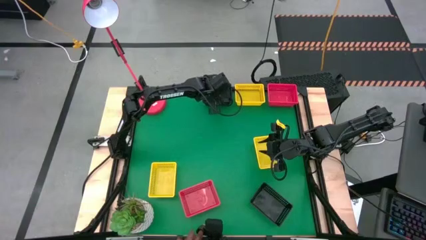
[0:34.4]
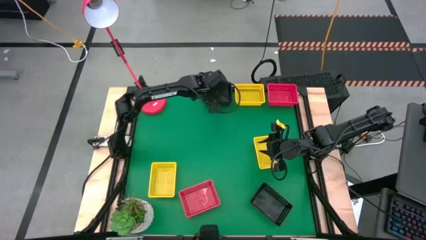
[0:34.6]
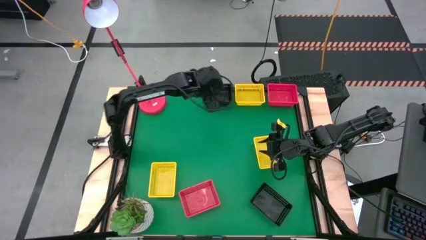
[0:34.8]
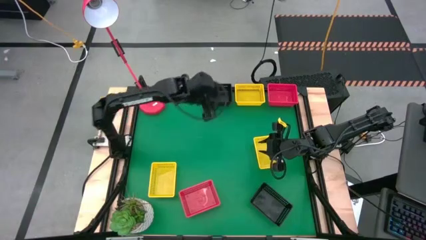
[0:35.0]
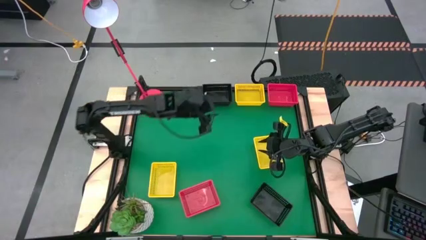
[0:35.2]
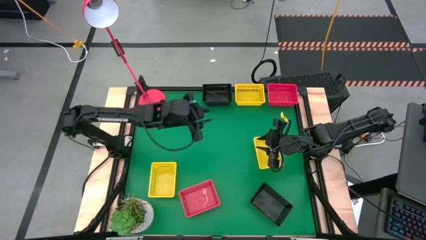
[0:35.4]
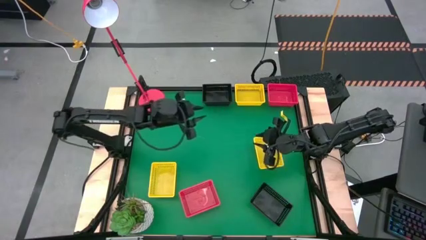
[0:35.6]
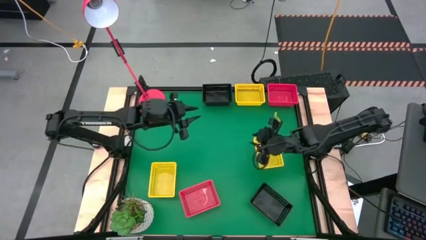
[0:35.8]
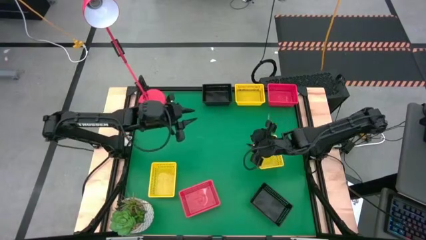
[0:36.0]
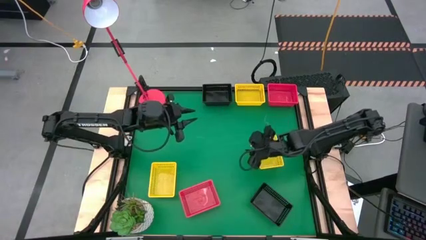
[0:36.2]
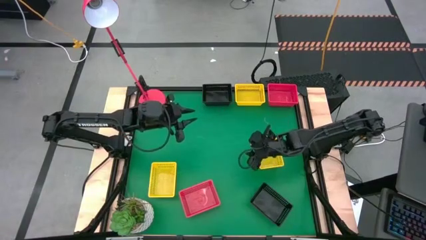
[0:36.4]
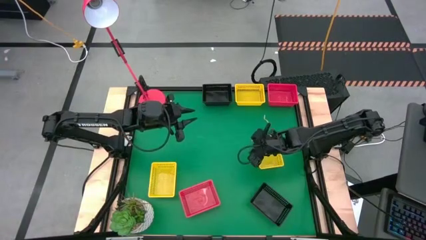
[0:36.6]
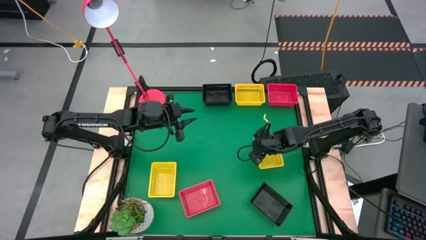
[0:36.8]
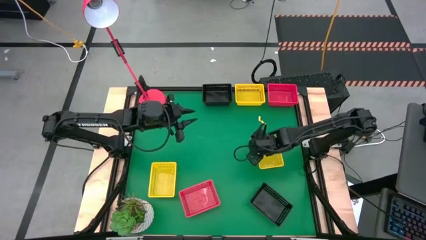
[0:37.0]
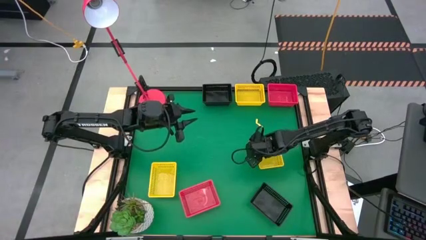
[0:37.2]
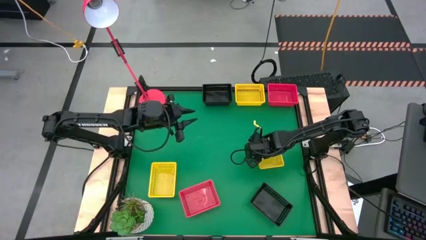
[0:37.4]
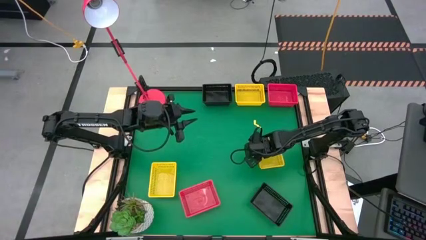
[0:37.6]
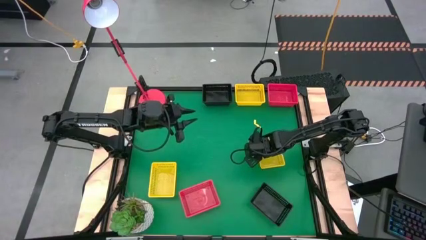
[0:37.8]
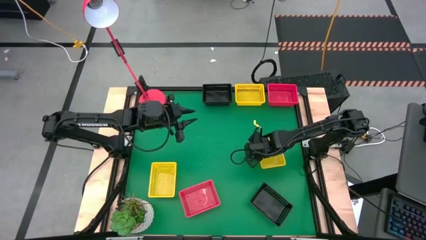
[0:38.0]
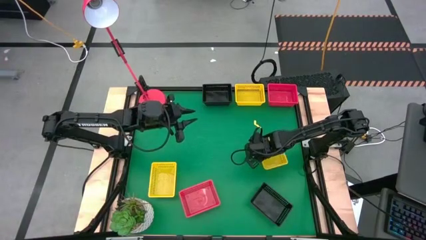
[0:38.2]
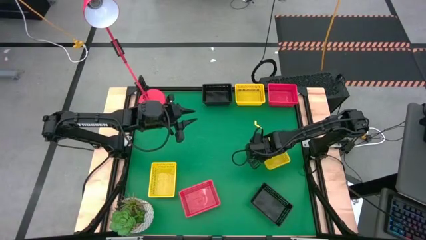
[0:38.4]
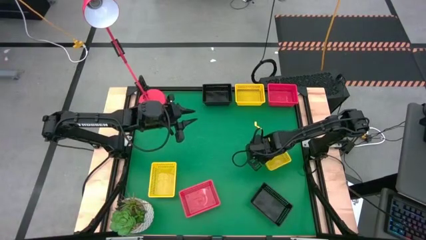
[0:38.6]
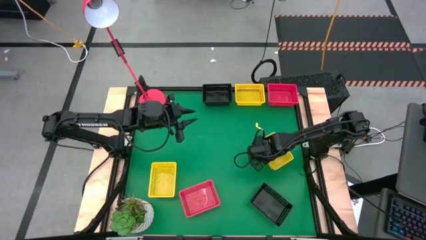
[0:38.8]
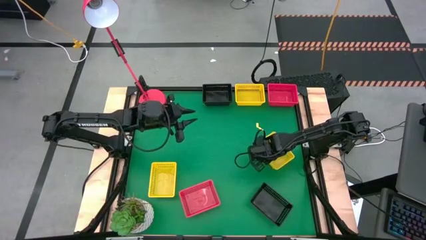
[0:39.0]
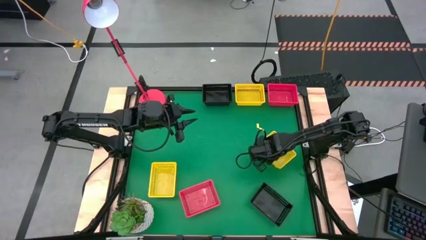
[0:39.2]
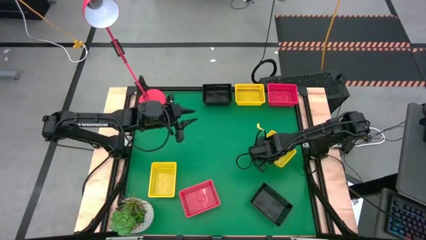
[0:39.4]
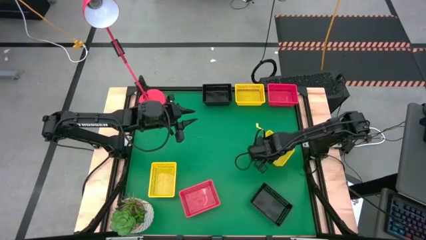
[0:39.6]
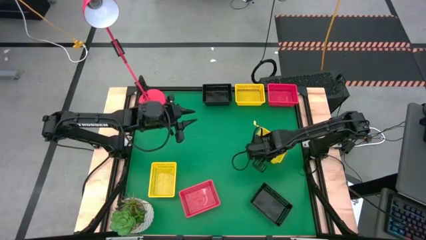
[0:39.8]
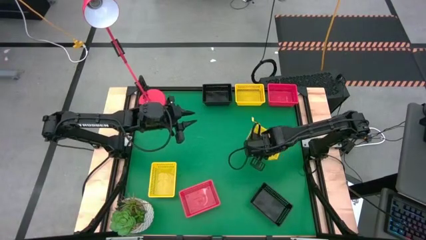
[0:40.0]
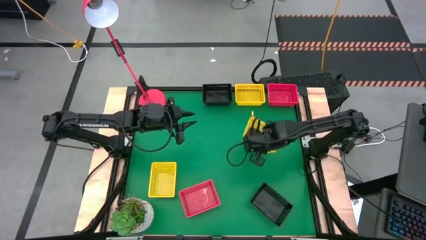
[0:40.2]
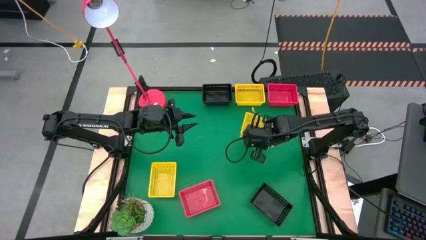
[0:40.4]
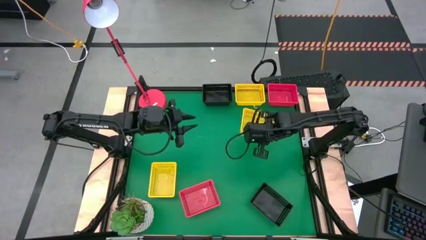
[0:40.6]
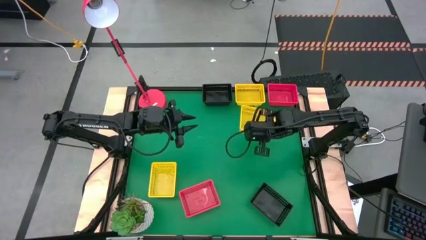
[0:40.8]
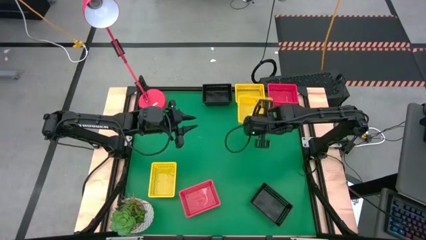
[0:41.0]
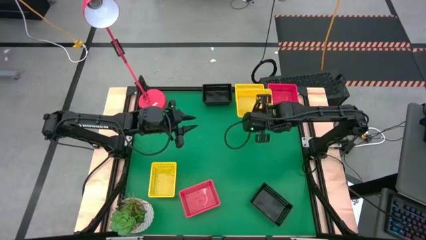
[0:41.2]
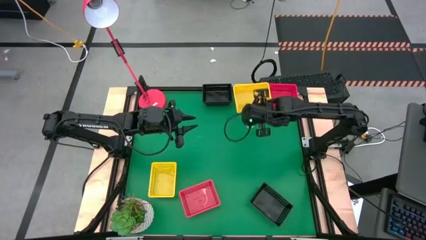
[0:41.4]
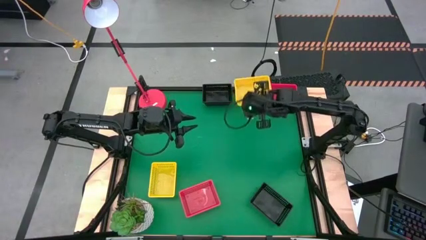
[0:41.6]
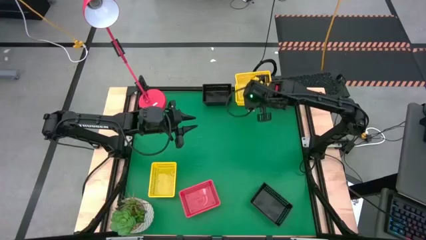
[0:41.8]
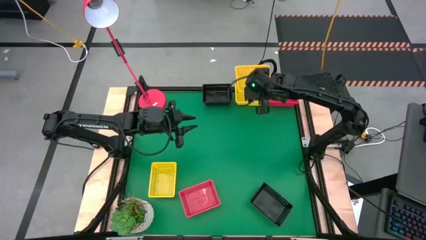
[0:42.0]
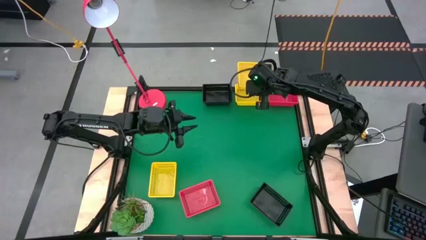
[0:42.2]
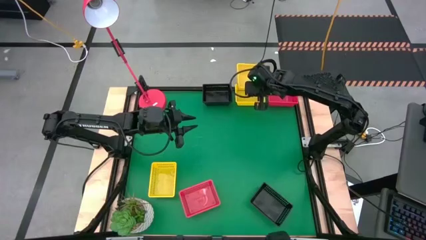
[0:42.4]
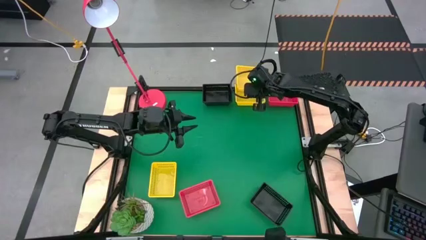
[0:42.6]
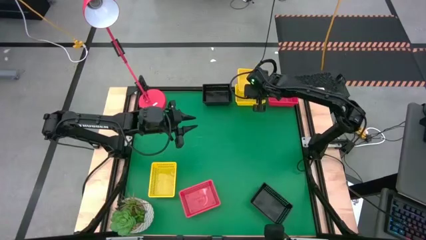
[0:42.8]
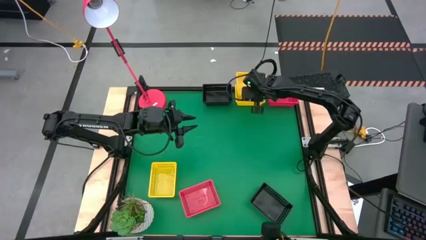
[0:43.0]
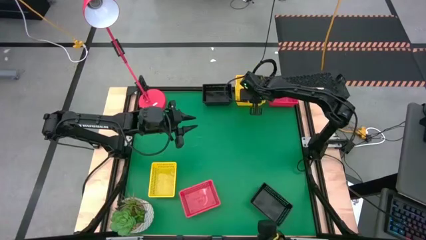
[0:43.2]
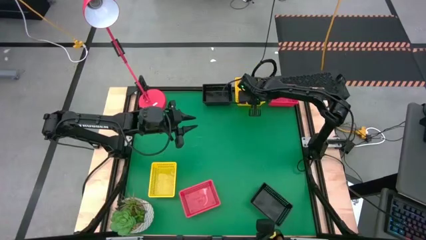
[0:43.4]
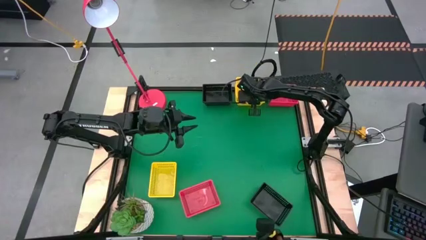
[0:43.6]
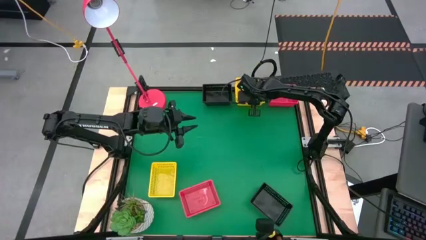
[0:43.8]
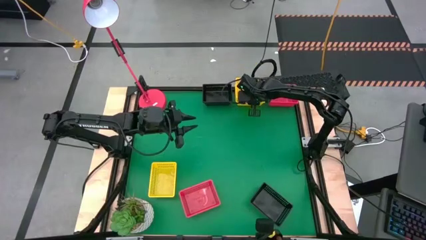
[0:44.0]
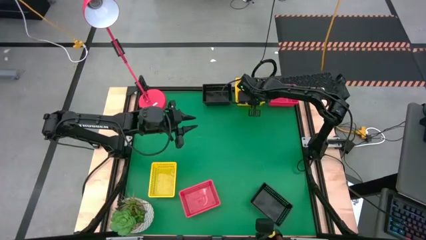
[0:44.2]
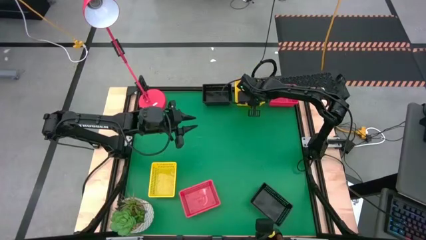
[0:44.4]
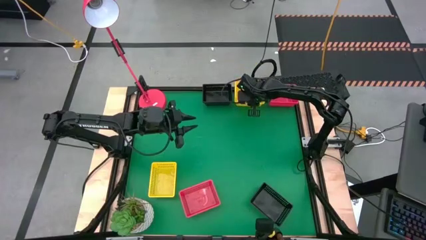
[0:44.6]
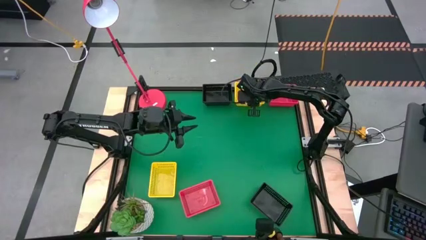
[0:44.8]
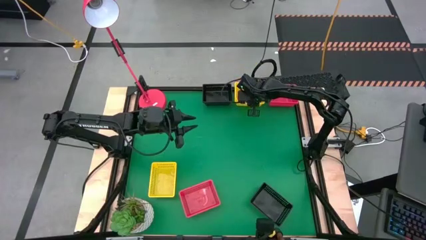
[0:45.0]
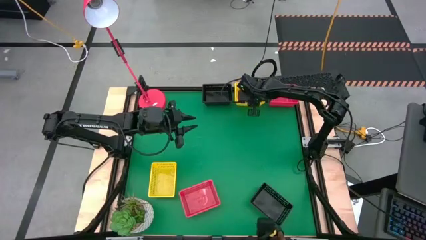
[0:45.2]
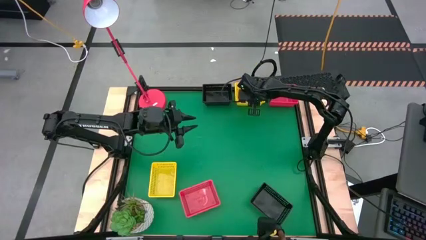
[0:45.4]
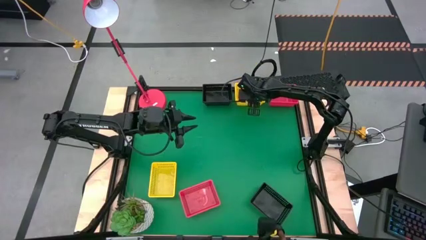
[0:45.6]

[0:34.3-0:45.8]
Stack the right yellow bin on the top yellow bin
